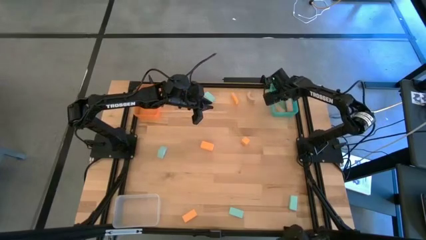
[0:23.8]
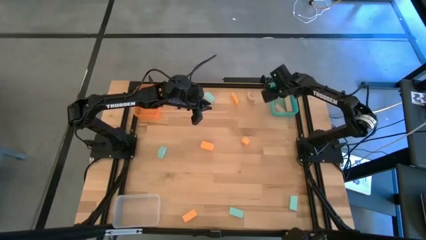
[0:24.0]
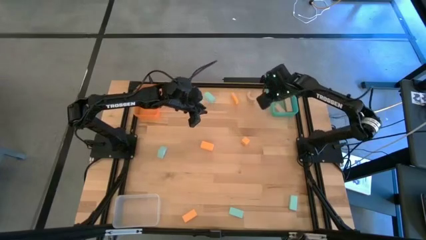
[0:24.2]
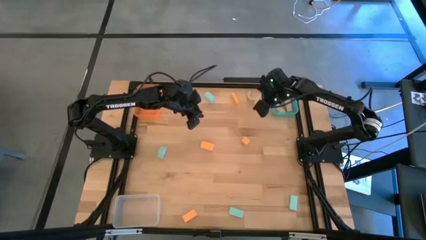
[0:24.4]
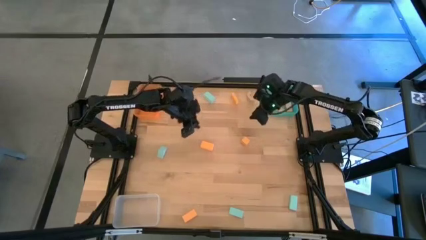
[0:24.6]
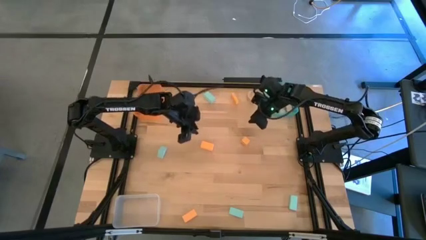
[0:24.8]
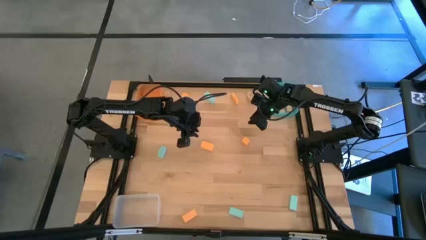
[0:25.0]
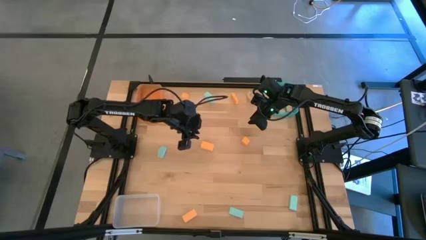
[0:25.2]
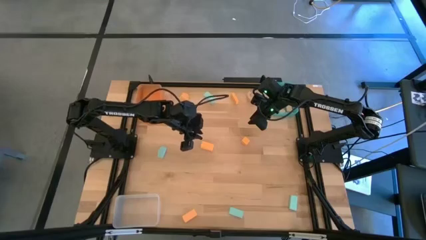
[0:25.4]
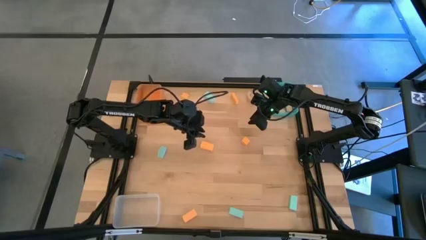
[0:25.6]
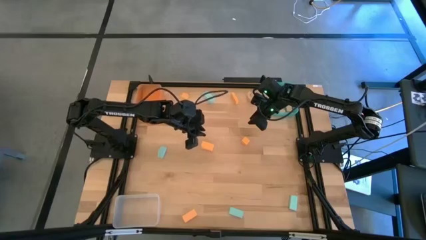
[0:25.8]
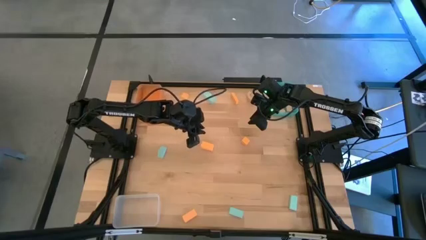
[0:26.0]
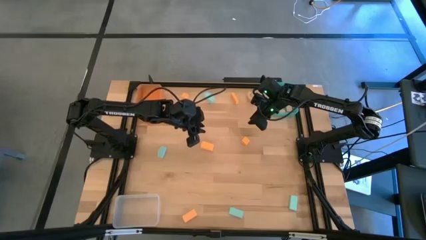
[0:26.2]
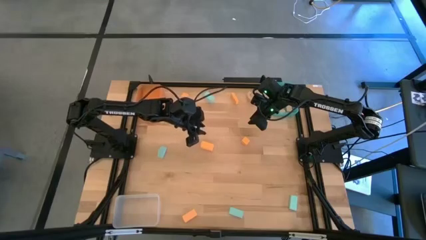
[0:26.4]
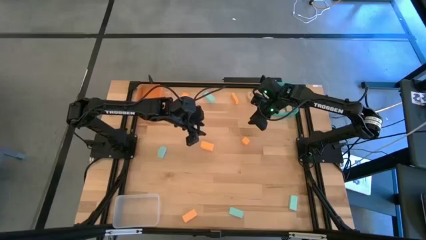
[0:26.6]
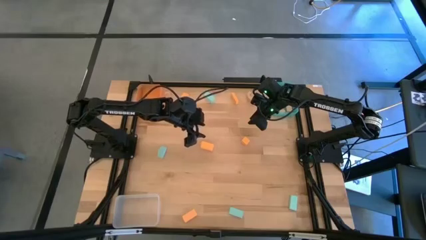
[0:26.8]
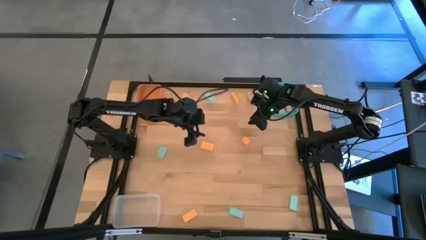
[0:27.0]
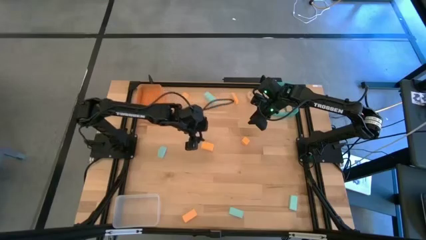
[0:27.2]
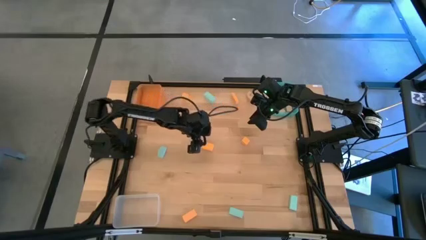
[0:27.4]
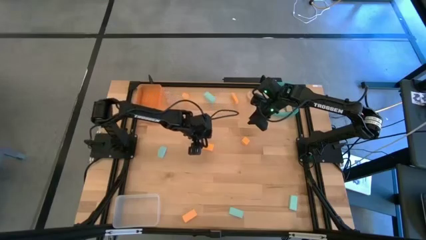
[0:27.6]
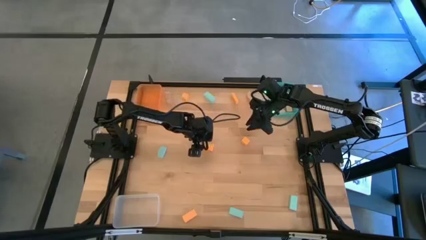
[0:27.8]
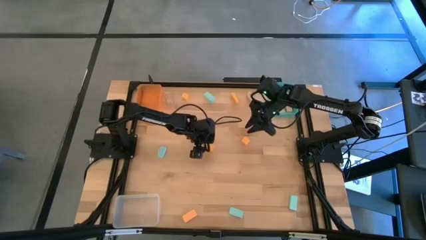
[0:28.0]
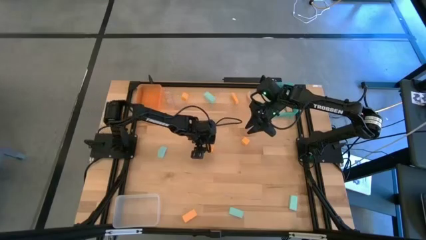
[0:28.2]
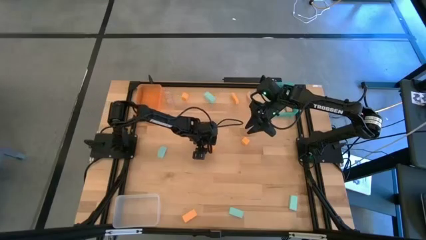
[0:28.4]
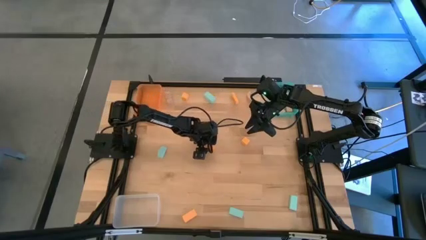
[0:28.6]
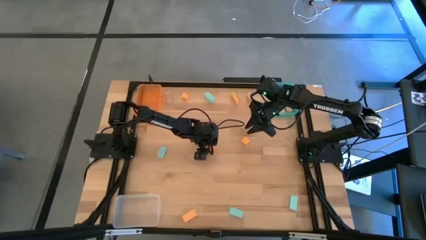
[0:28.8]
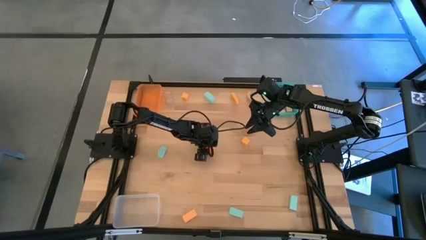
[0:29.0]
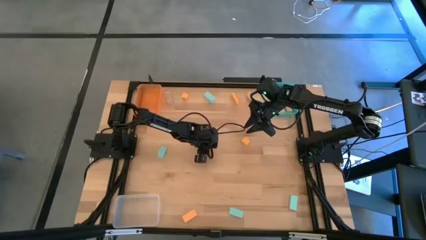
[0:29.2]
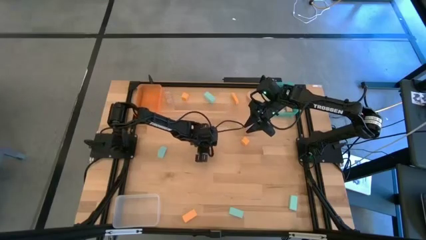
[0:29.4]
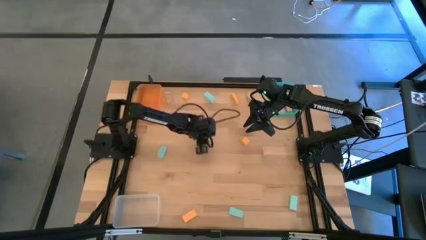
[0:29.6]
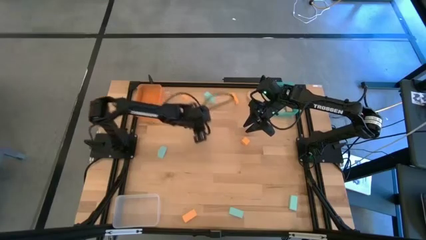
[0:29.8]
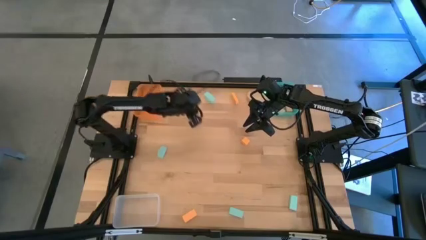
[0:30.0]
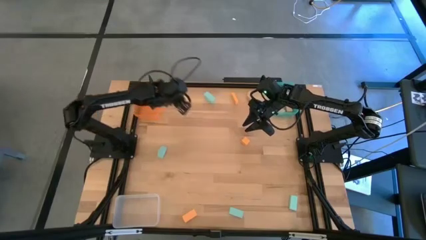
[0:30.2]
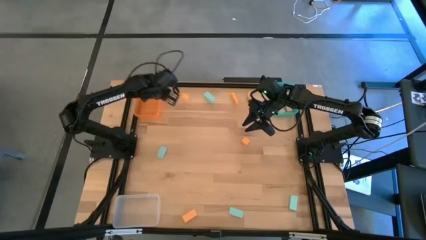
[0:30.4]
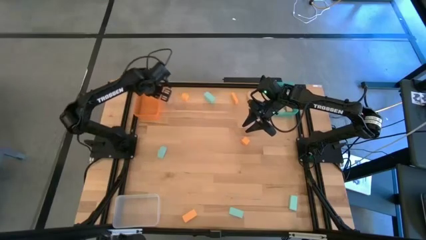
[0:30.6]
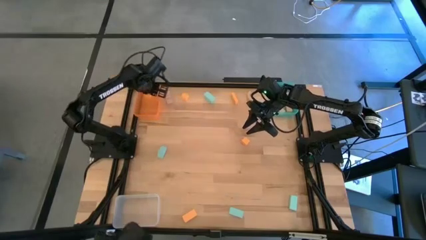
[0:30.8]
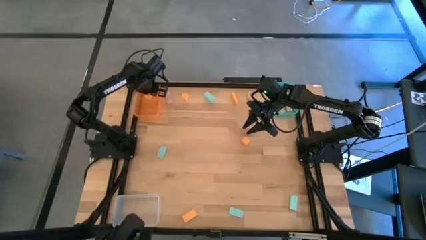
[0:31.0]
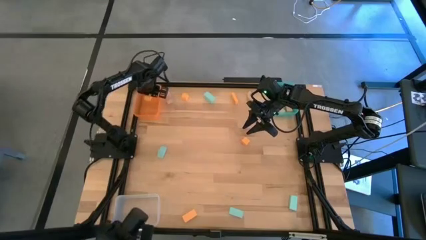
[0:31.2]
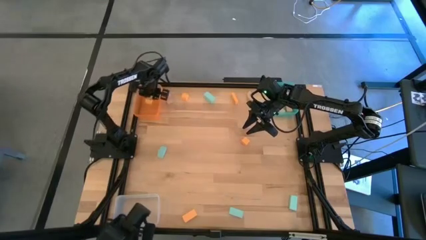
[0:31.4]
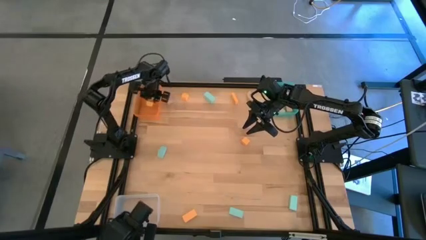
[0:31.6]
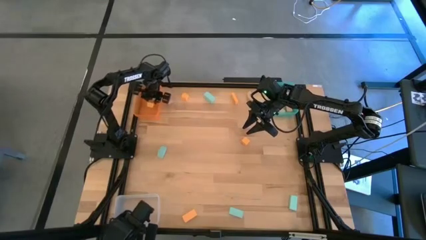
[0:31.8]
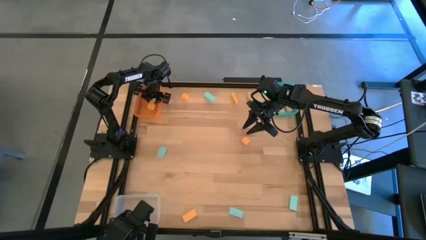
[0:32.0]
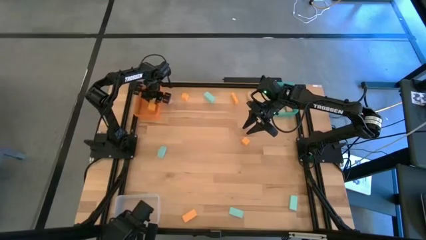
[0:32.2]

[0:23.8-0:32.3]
Task: Sort & place blocks by color
Put the orange block into the orange bin

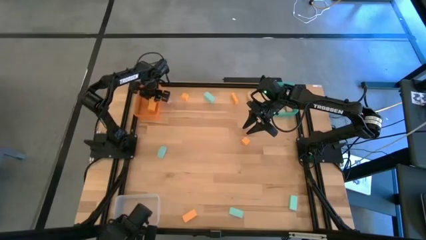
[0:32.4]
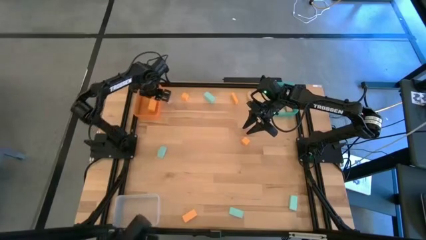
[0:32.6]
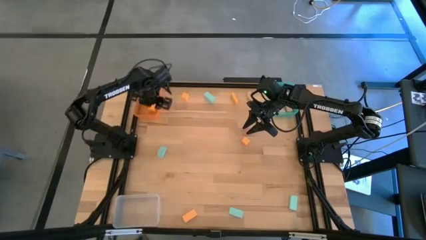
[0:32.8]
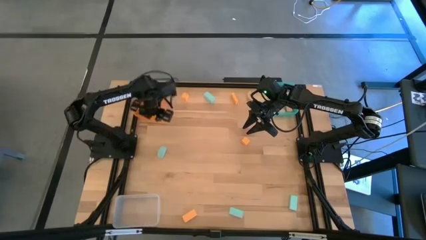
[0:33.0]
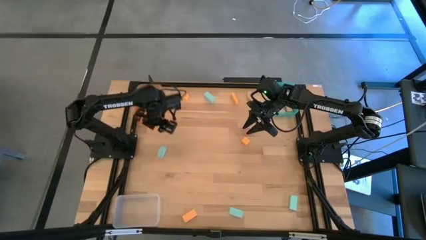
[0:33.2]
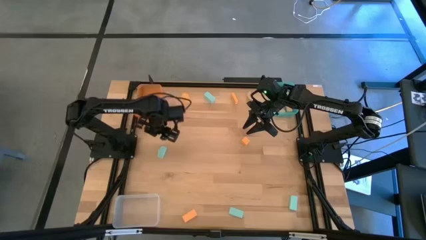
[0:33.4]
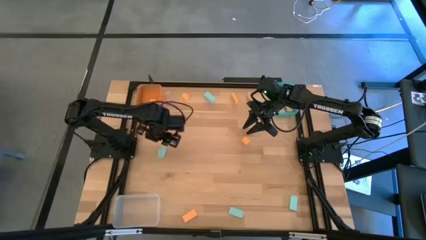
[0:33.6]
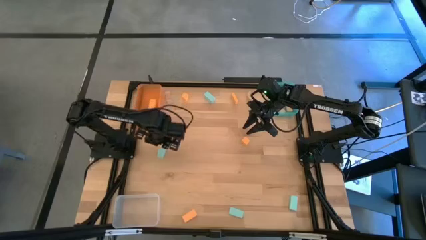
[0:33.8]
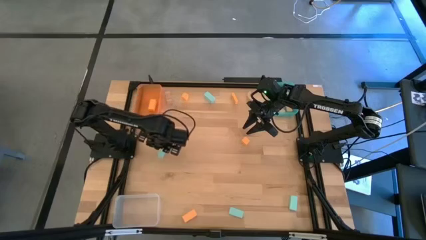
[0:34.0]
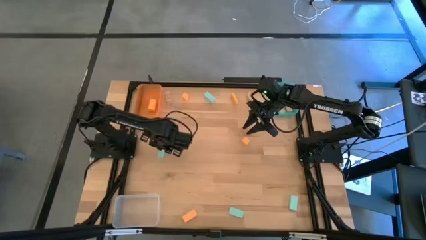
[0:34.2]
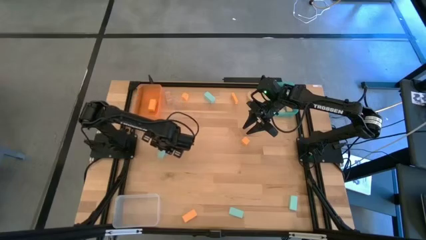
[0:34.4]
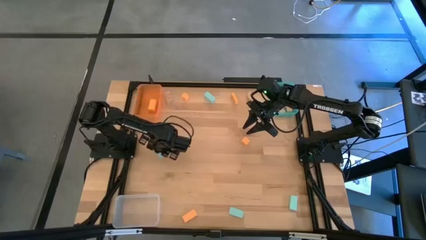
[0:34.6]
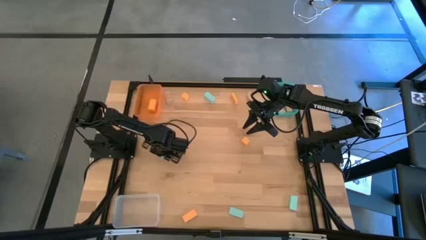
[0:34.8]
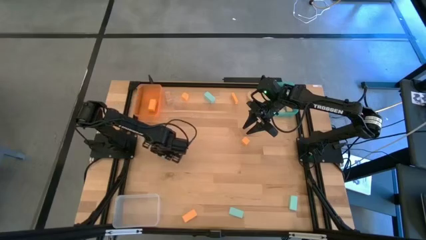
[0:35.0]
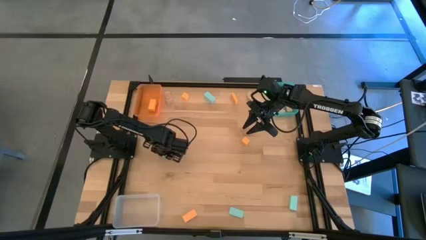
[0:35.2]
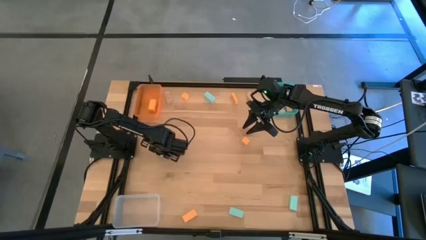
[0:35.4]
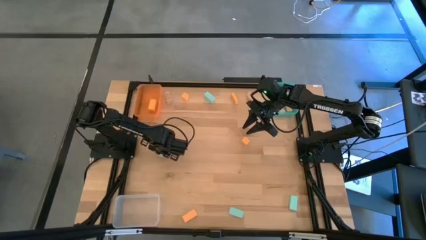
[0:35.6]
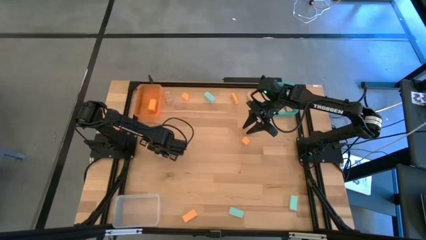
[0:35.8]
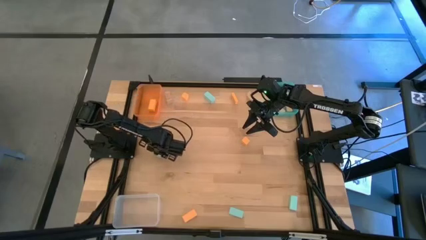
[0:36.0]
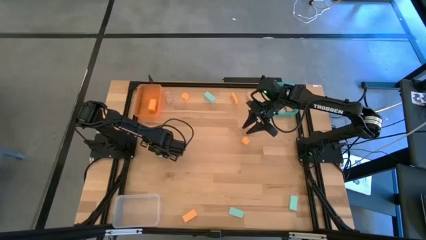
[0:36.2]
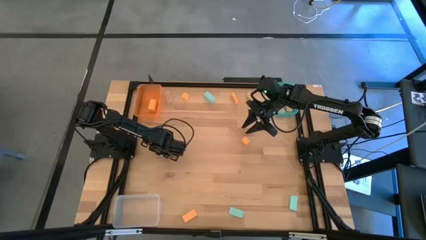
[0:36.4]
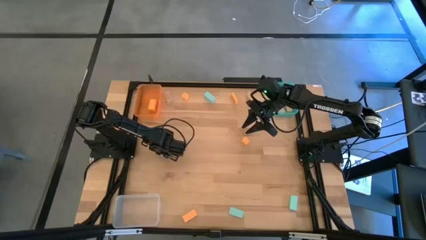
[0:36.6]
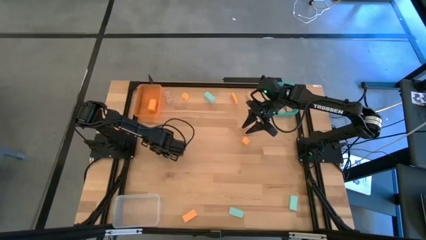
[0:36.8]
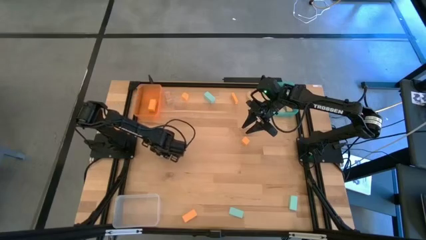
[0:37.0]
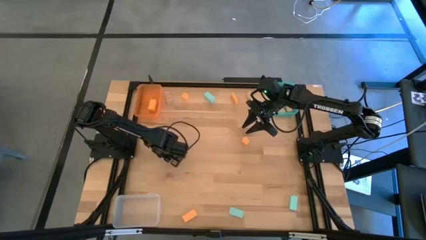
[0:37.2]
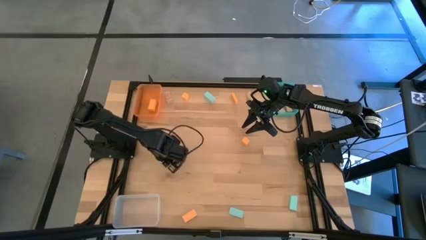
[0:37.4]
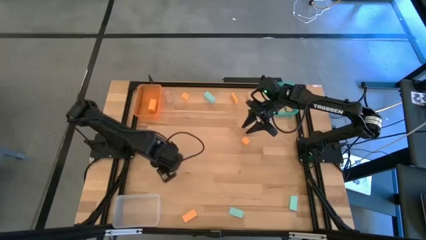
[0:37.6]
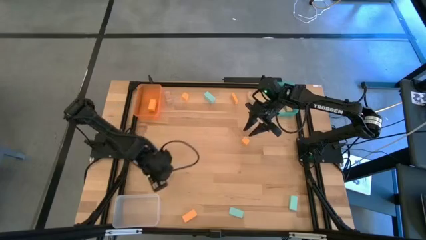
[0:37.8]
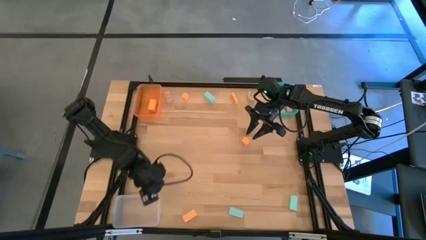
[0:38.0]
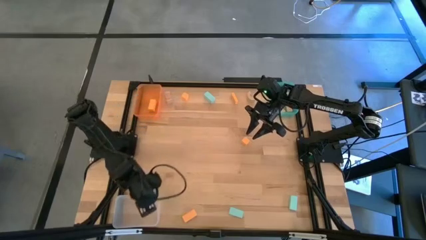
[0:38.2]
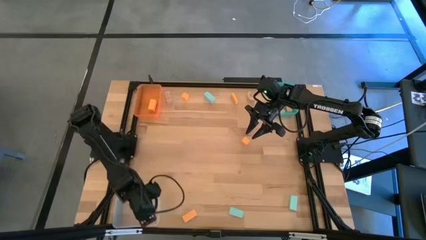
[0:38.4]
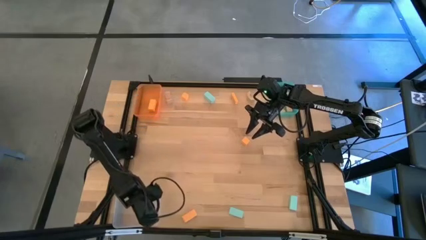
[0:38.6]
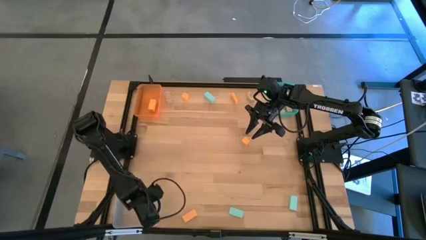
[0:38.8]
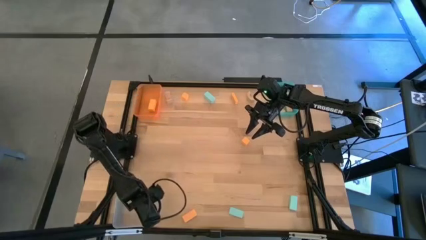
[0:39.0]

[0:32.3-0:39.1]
Put the blue block into the transparent bin

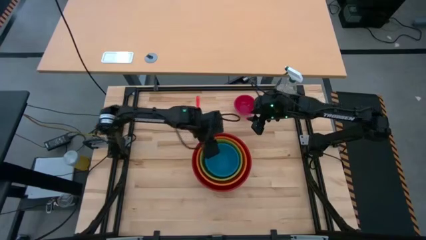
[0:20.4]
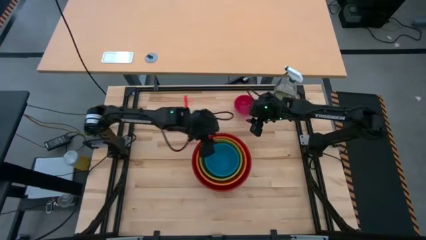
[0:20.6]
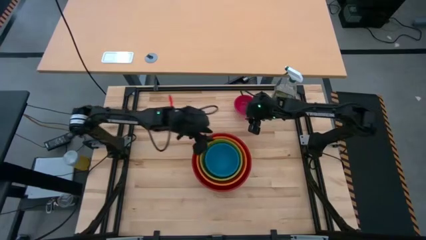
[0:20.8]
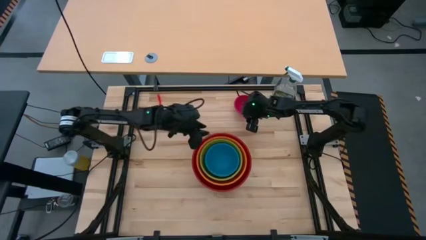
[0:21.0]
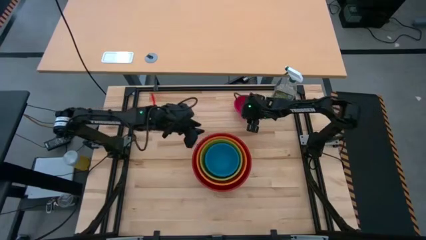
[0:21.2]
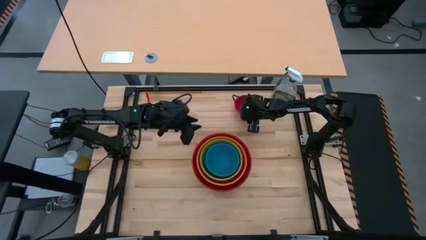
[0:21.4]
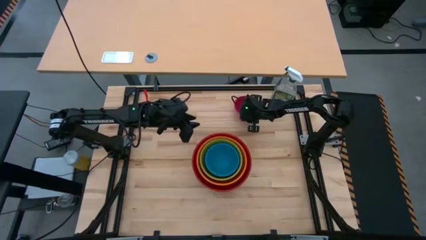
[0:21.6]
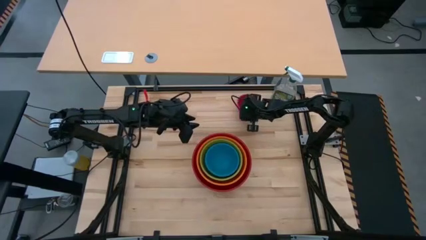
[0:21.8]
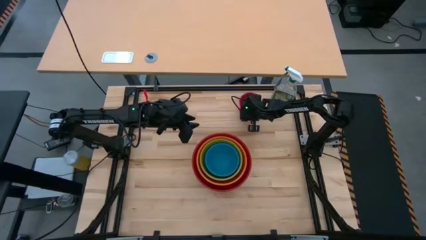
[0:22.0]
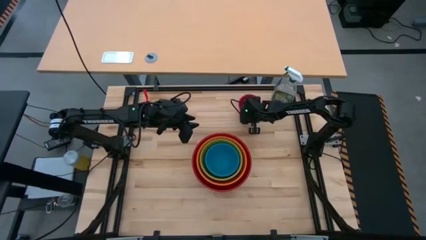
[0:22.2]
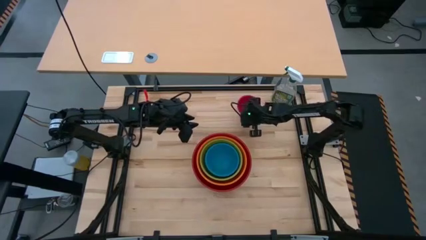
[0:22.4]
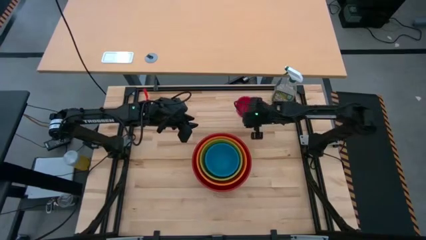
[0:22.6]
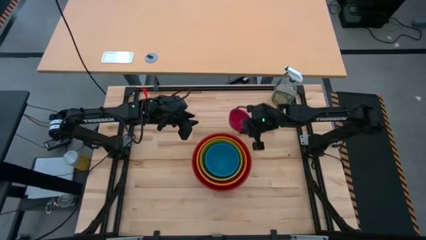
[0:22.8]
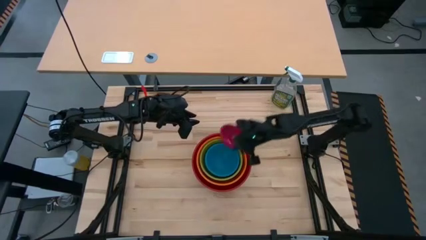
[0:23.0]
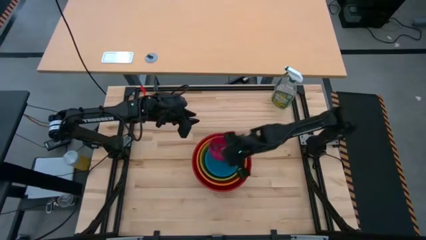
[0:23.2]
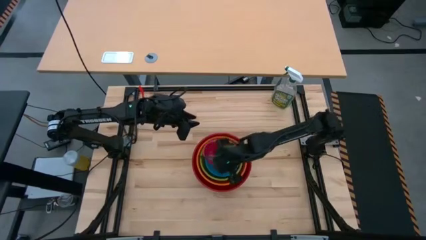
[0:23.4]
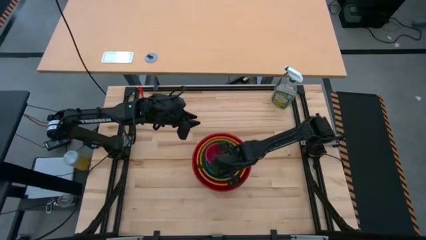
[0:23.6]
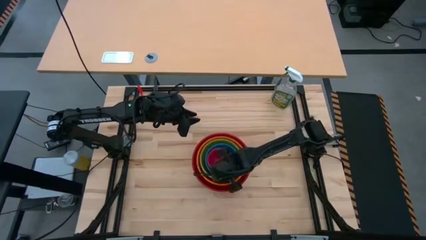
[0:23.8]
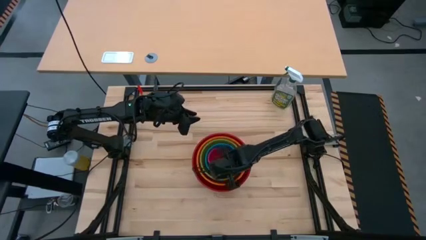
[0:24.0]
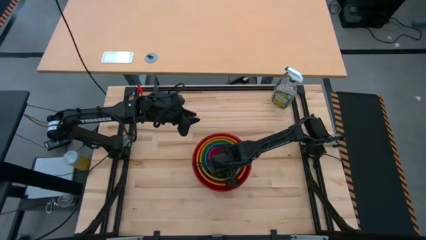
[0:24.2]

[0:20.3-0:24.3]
Task: Nest bowls inside each other by size order
Stack the pink bowl on top of the blue bowl
